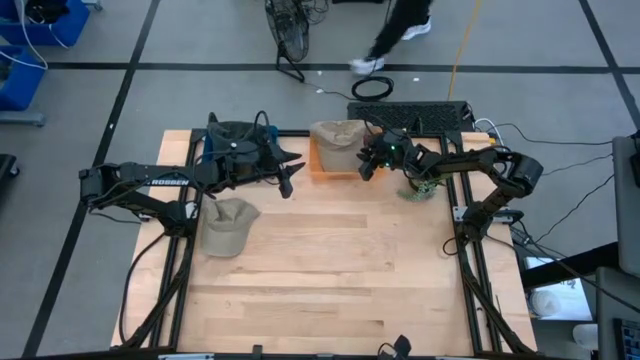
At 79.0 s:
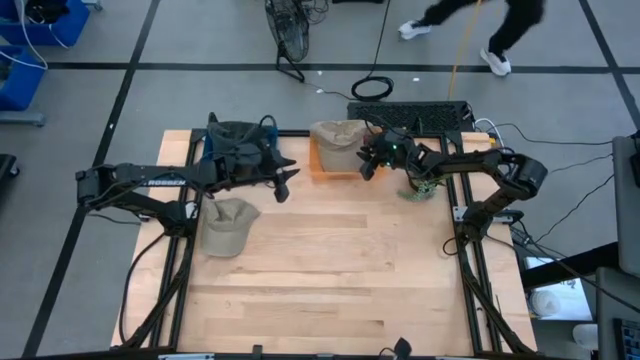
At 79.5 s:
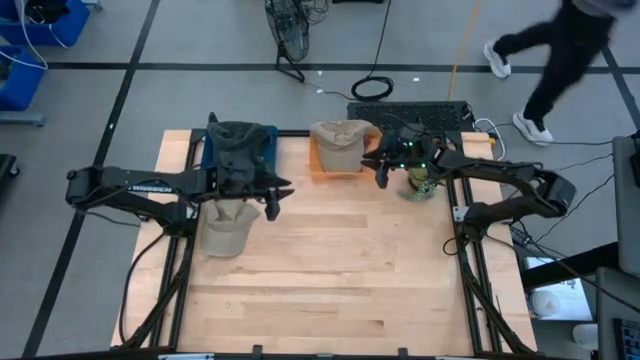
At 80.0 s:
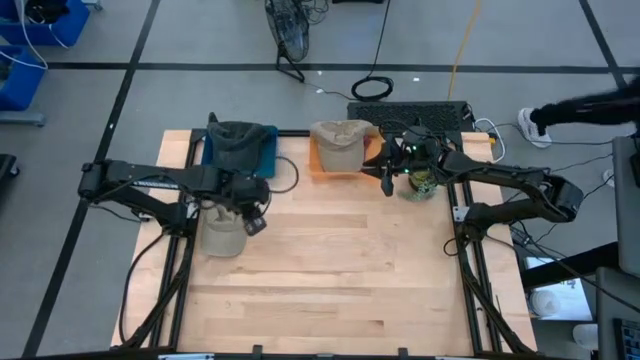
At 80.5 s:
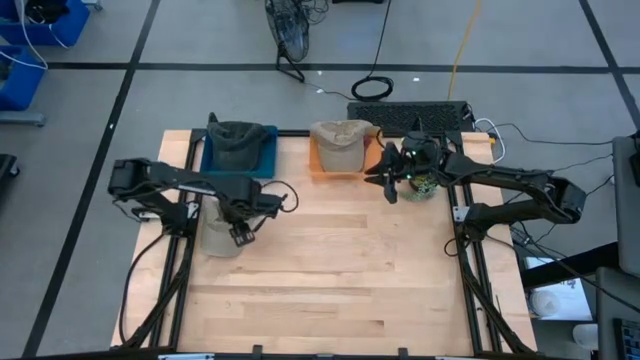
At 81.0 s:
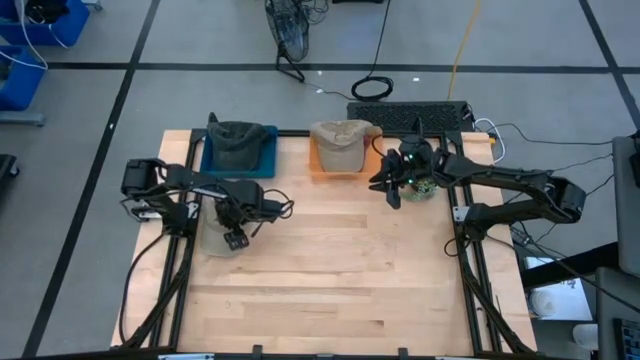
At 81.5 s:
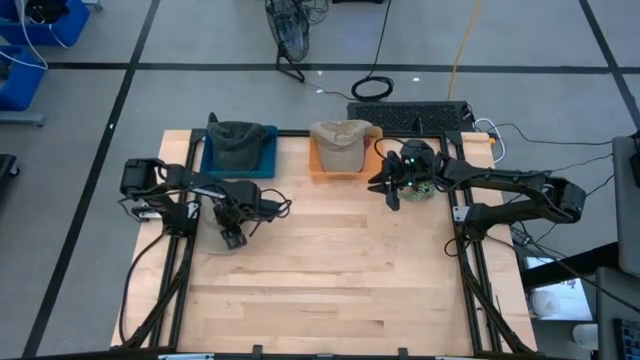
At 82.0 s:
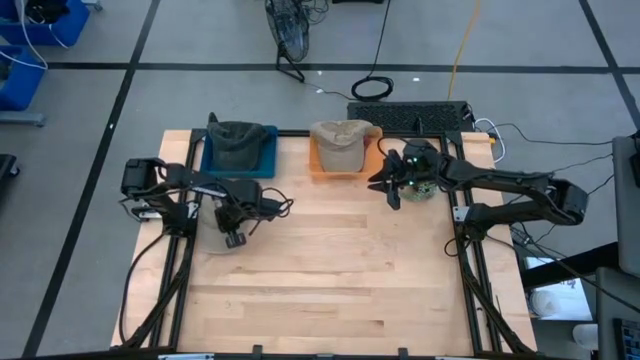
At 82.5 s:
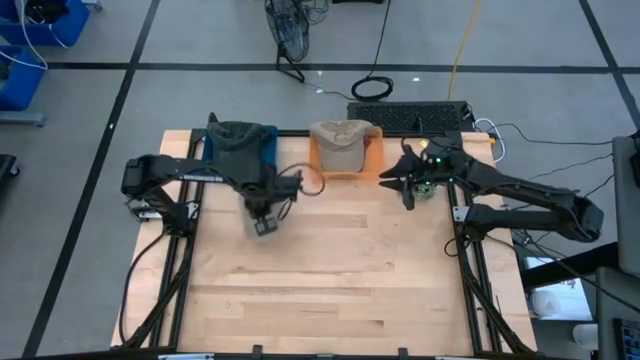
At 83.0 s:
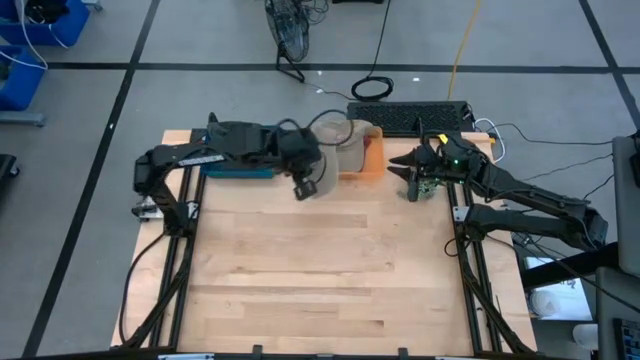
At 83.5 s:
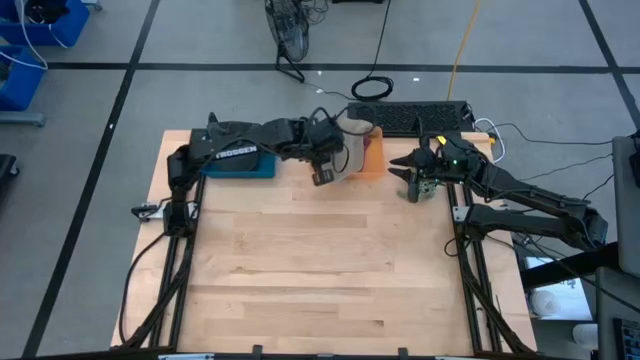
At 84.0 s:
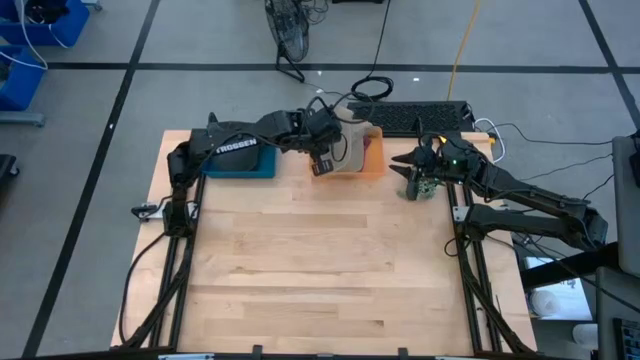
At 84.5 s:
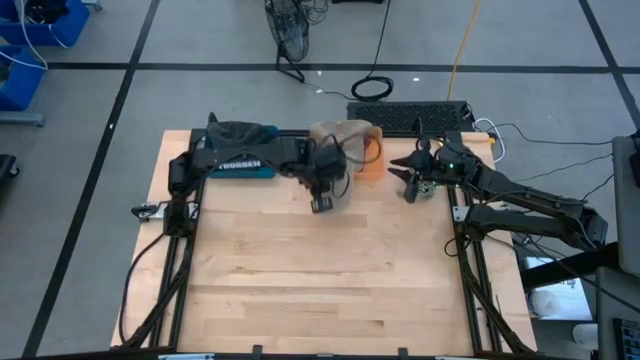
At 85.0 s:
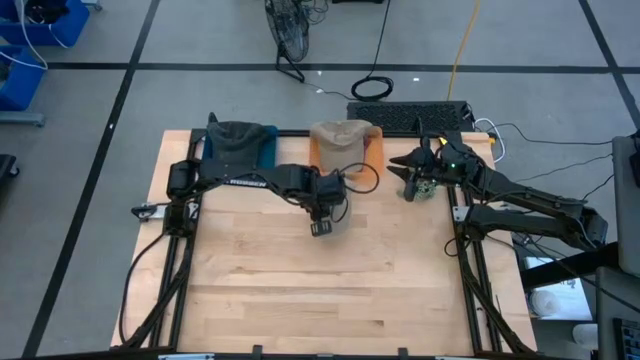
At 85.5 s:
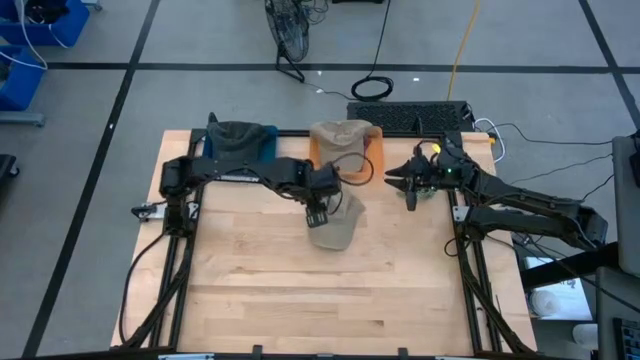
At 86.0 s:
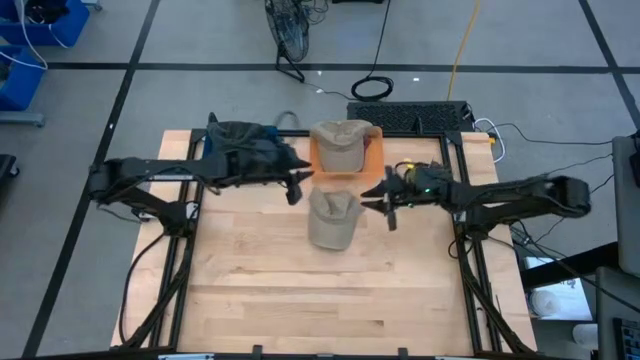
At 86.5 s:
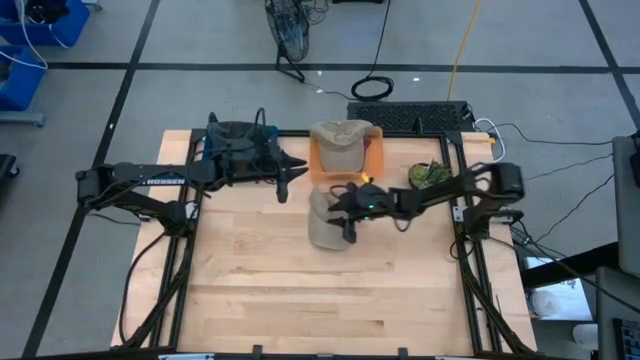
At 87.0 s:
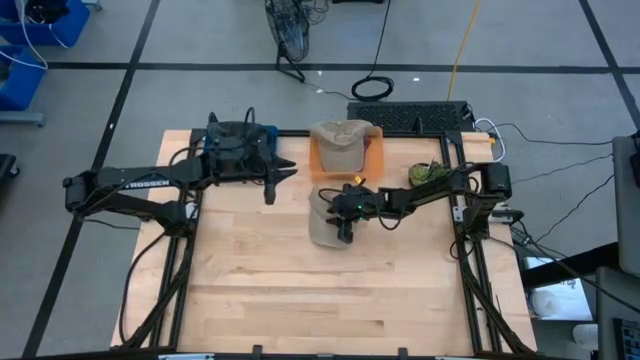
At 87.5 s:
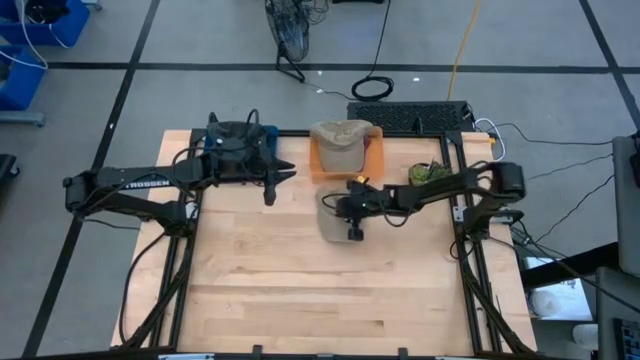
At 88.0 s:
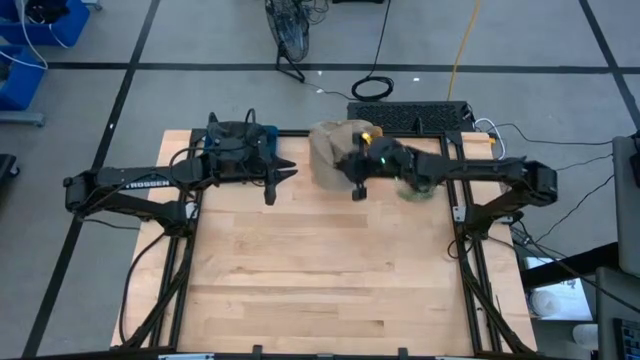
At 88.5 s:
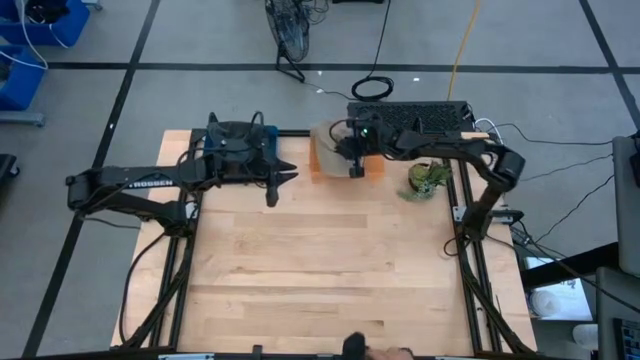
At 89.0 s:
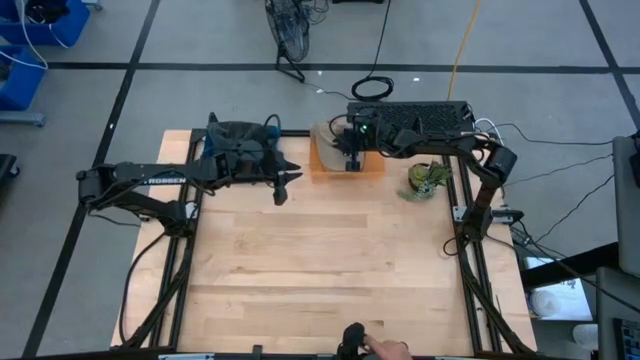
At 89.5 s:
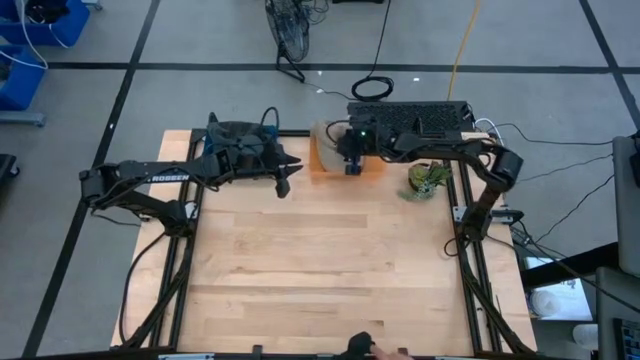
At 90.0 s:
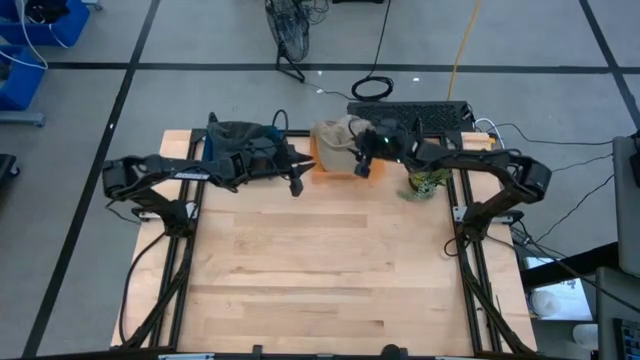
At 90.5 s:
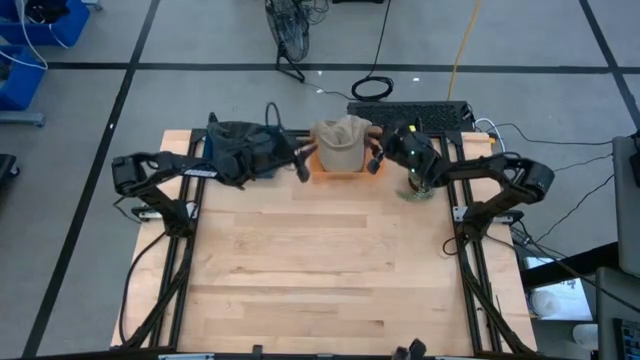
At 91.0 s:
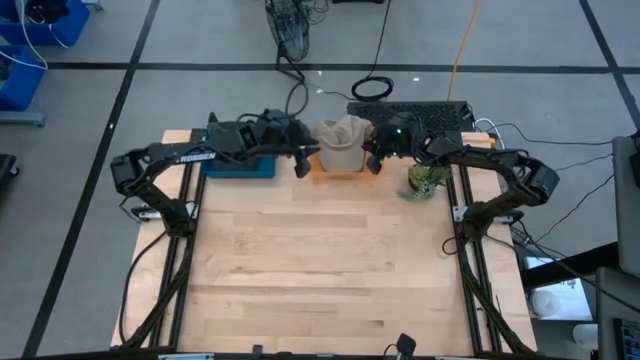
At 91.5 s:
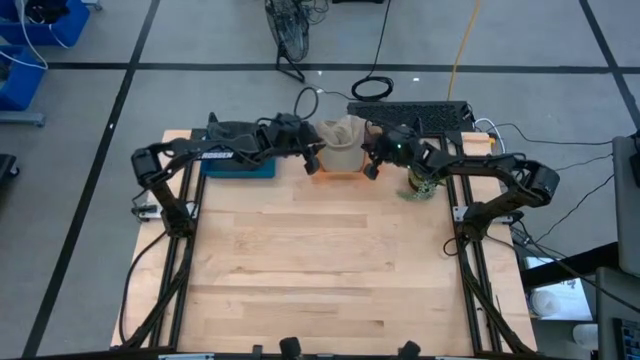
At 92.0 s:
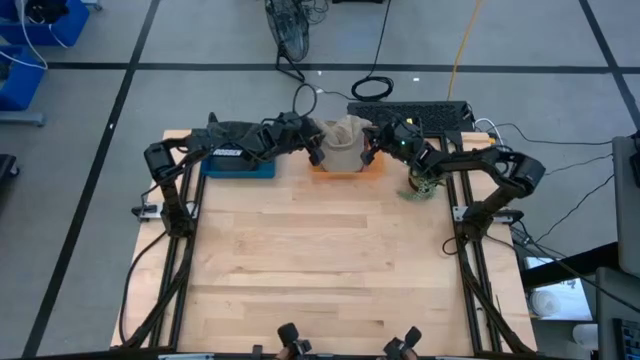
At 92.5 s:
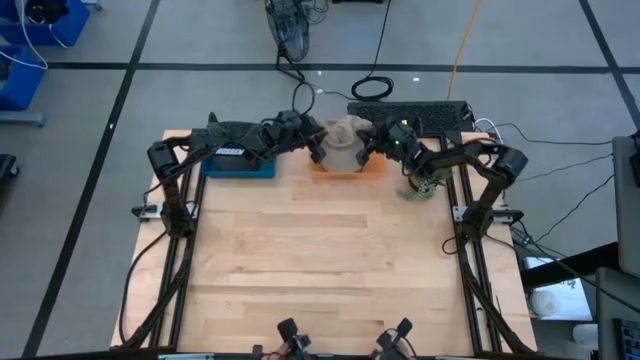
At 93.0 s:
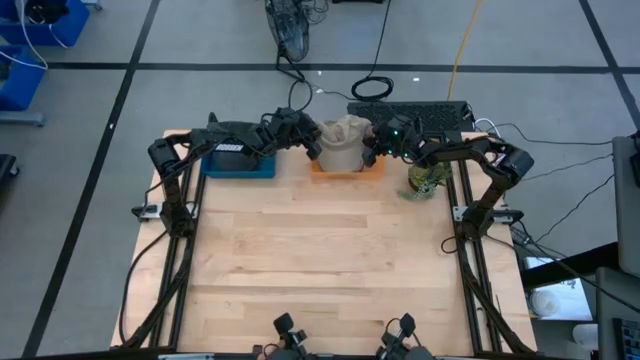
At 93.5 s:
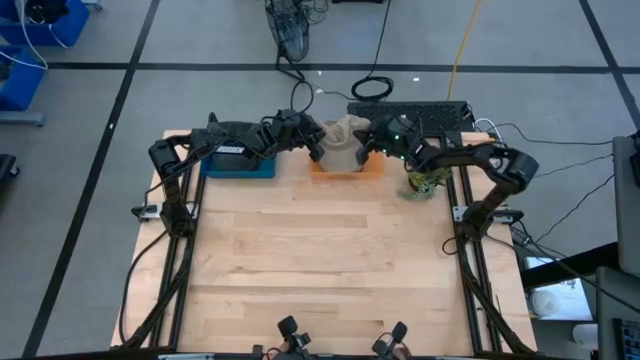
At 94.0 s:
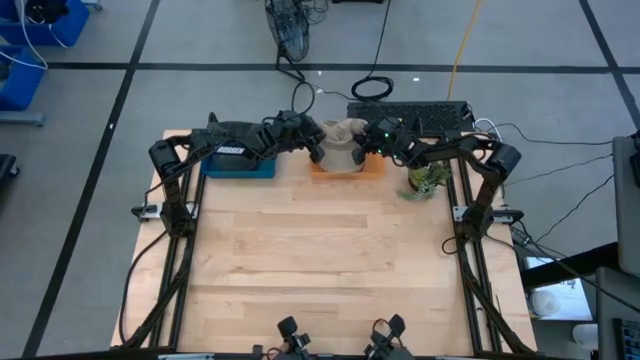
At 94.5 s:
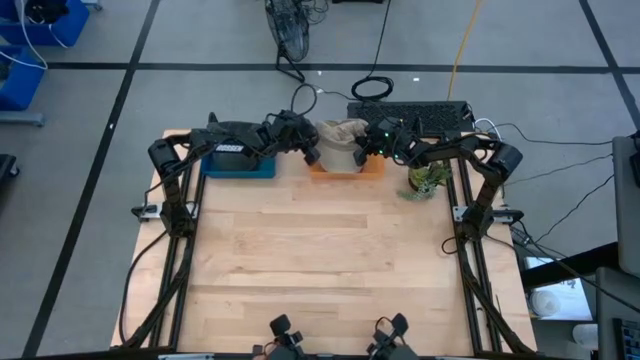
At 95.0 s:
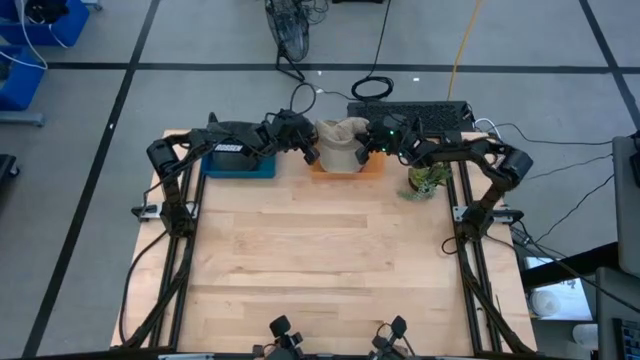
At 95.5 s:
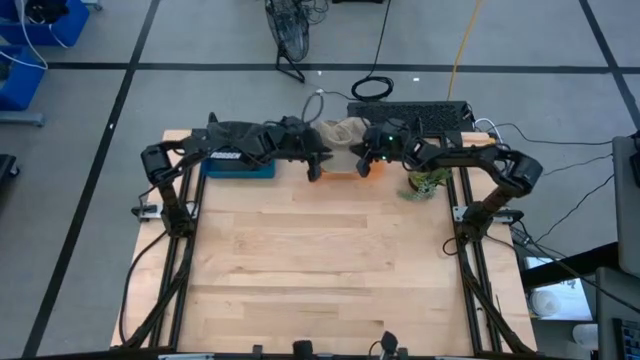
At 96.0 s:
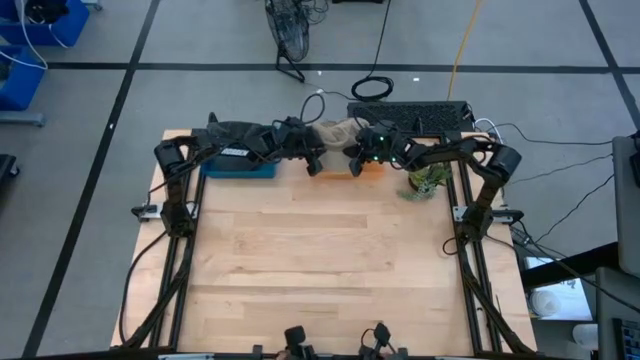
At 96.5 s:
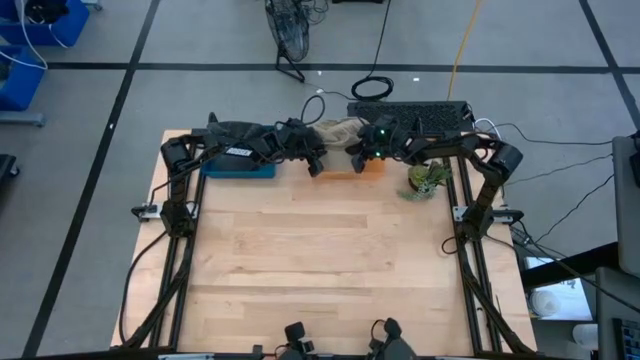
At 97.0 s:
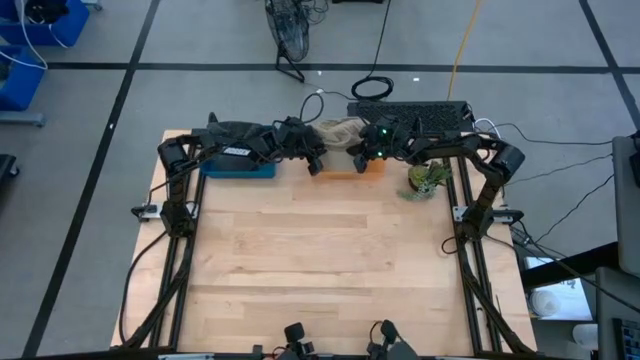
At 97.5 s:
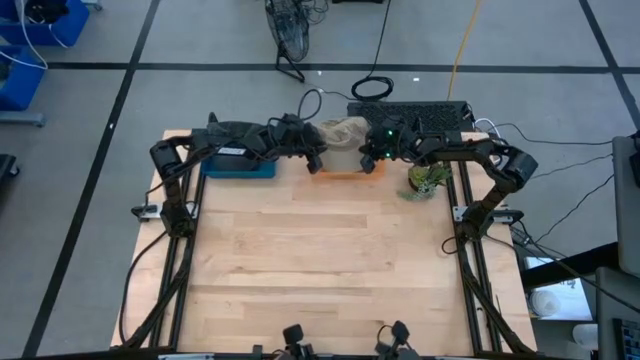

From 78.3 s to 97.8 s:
Task: Pick & Place hat
Put the brown cap into the orange bin

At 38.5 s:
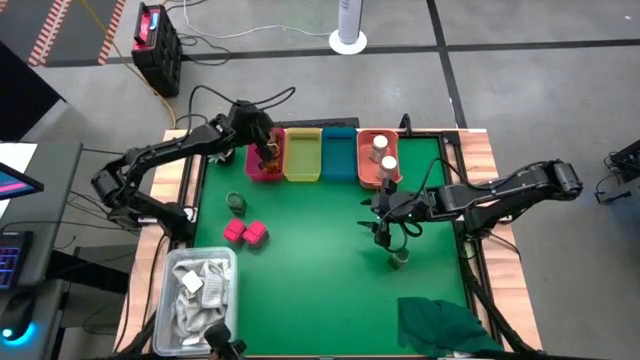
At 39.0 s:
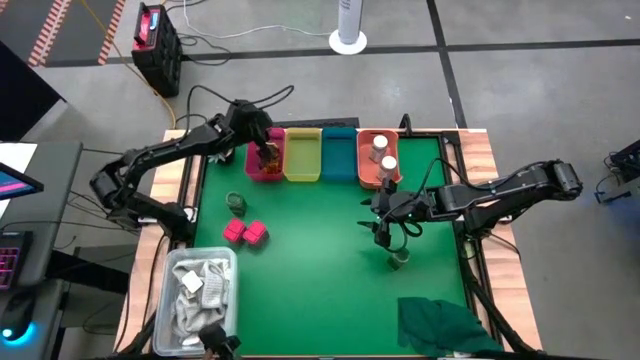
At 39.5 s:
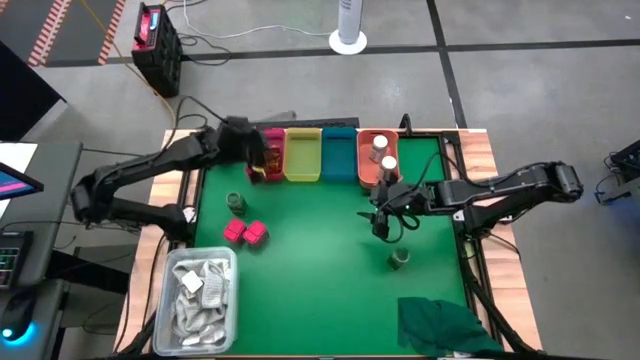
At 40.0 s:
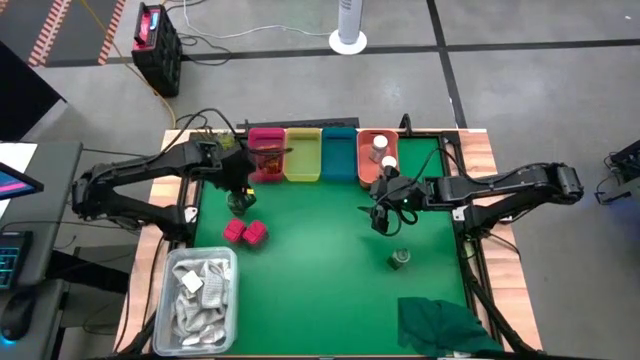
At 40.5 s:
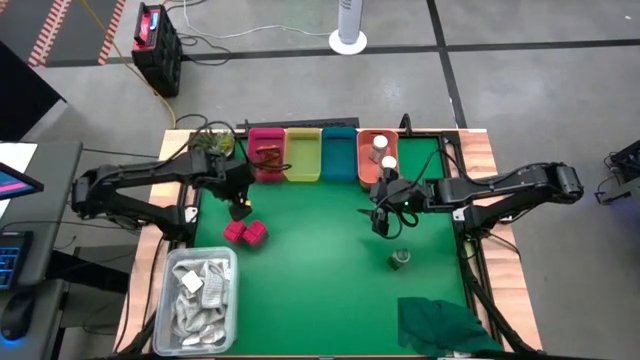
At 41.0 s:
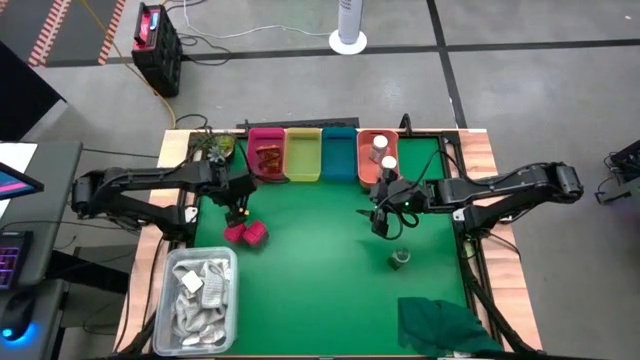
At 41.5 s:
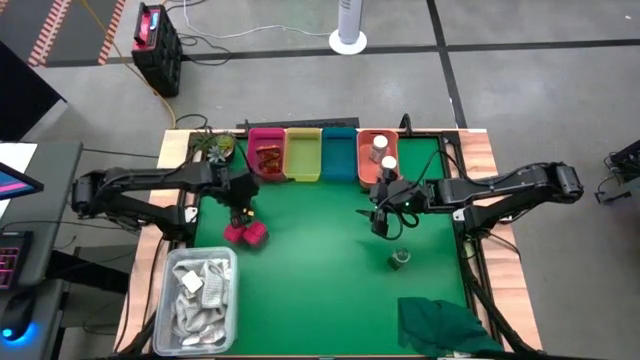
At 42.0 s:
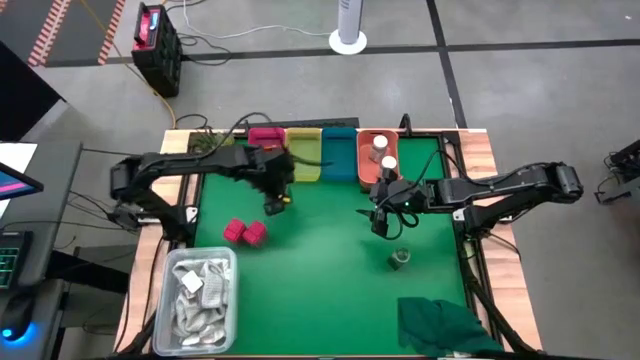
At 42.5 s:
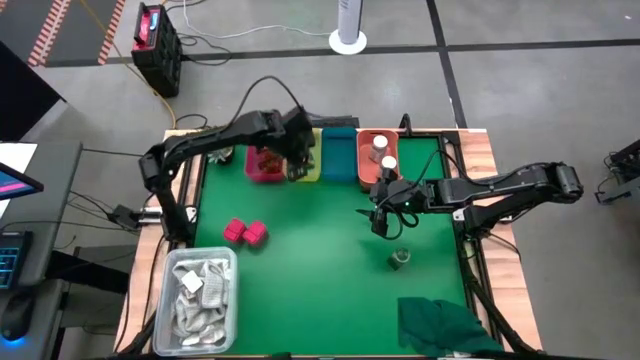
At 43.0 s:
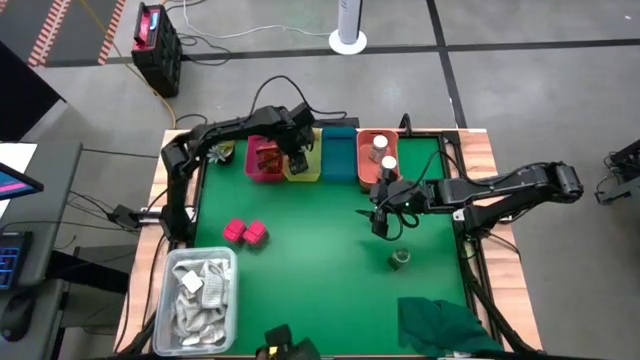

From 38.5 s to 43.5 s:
Task: Sort spices by type
Put the left green lid seasoning bottle into the yellow bin
